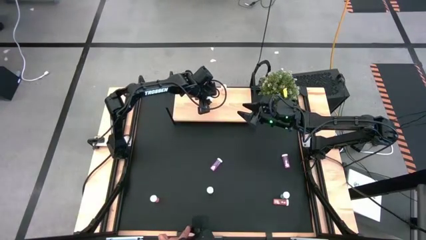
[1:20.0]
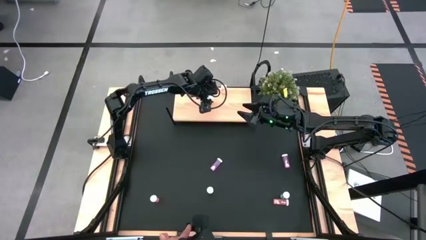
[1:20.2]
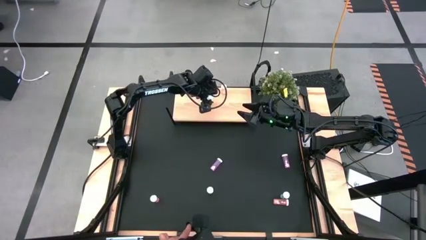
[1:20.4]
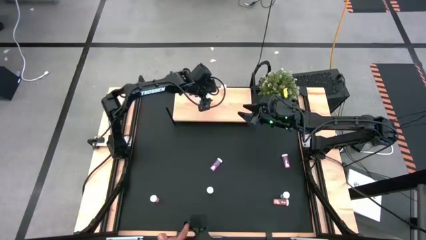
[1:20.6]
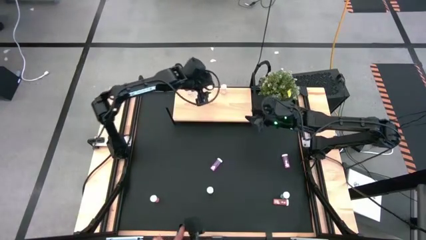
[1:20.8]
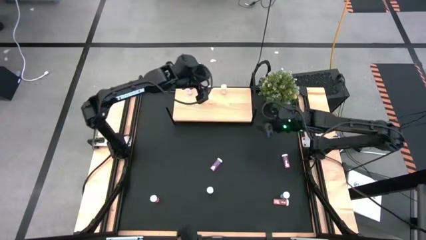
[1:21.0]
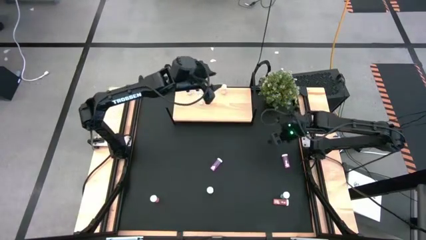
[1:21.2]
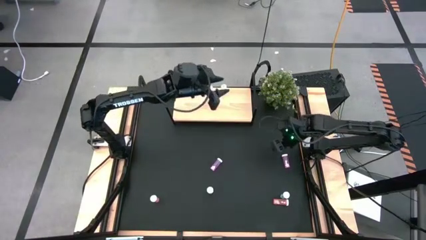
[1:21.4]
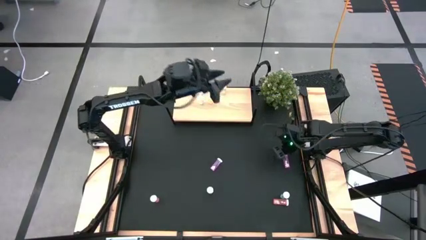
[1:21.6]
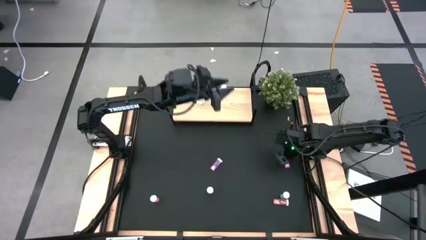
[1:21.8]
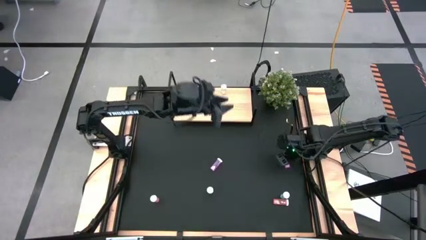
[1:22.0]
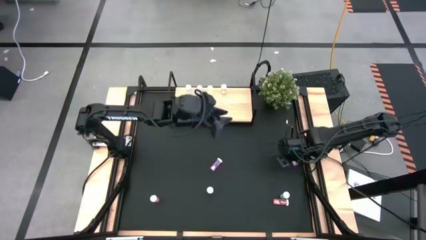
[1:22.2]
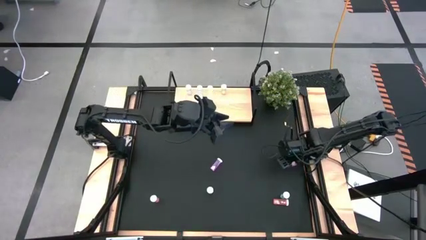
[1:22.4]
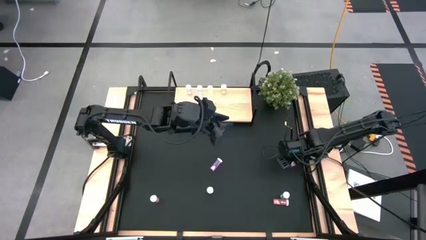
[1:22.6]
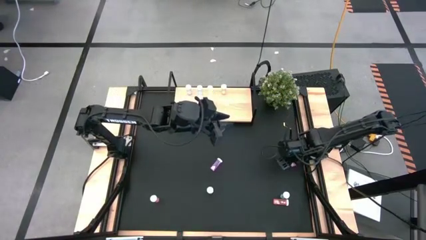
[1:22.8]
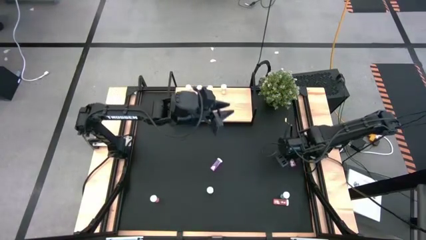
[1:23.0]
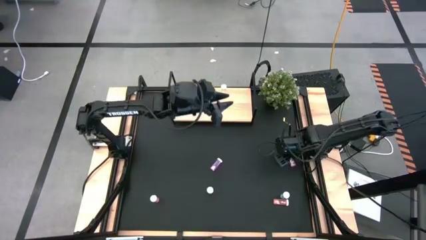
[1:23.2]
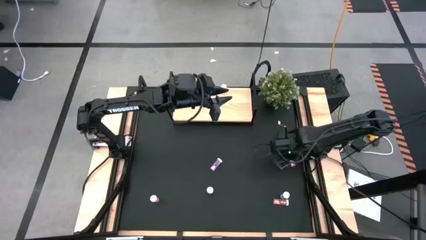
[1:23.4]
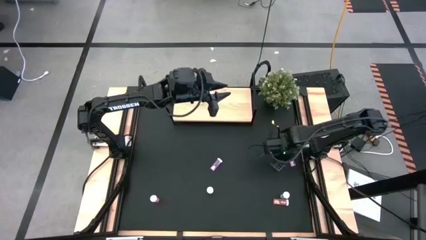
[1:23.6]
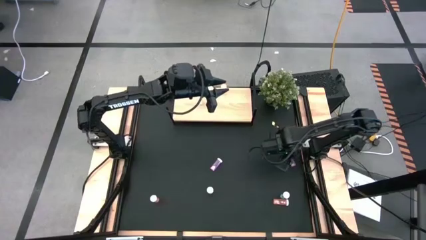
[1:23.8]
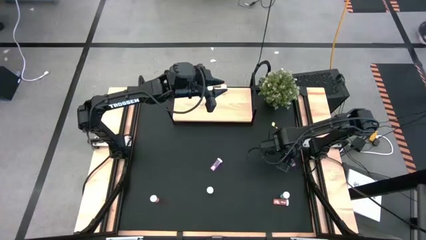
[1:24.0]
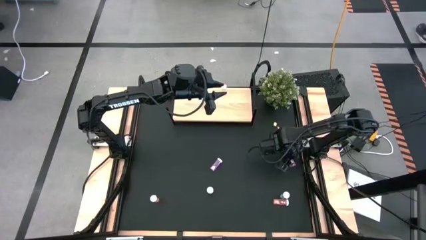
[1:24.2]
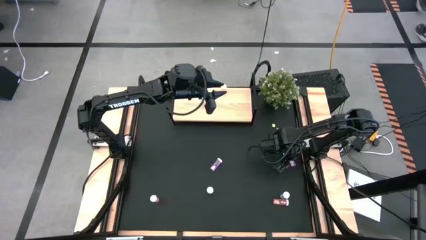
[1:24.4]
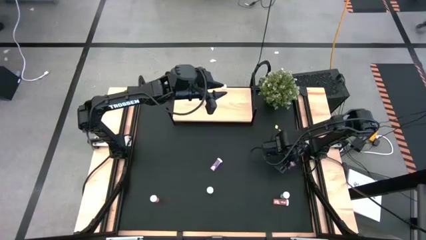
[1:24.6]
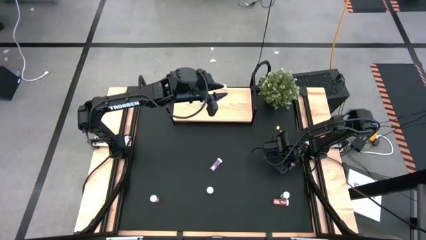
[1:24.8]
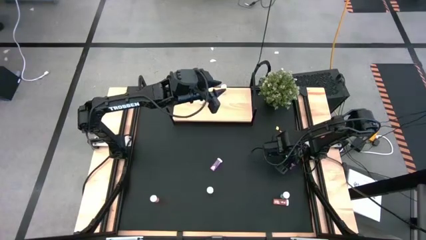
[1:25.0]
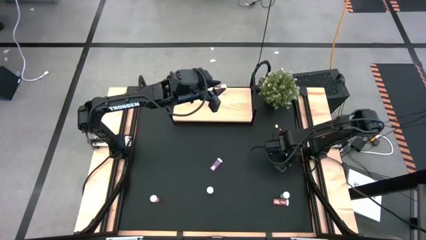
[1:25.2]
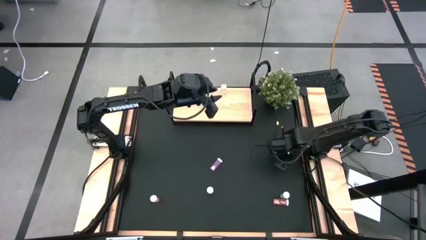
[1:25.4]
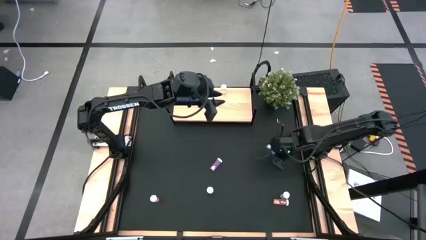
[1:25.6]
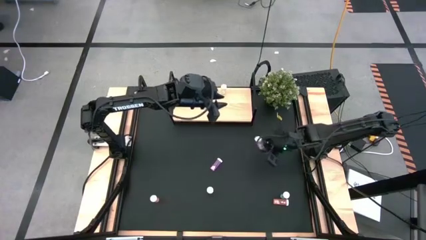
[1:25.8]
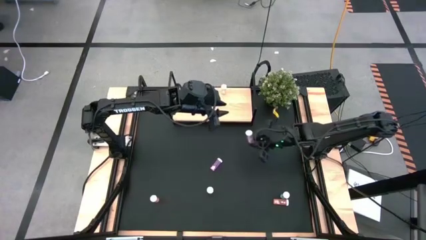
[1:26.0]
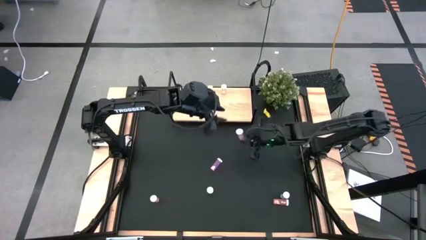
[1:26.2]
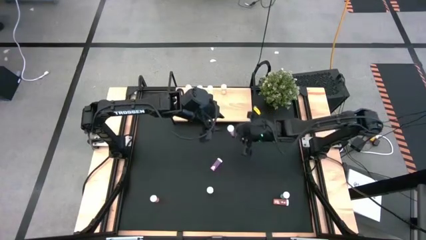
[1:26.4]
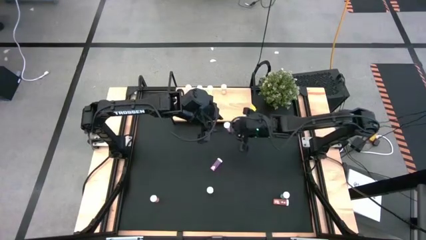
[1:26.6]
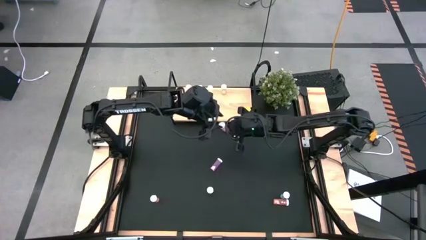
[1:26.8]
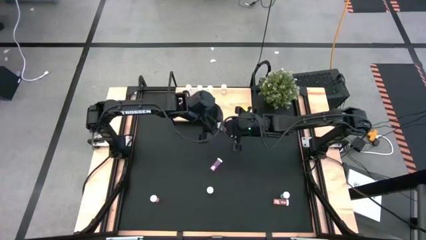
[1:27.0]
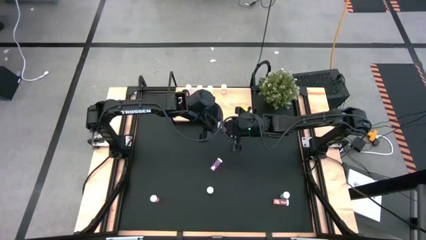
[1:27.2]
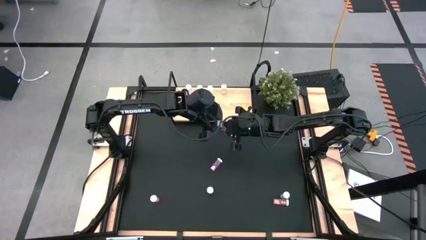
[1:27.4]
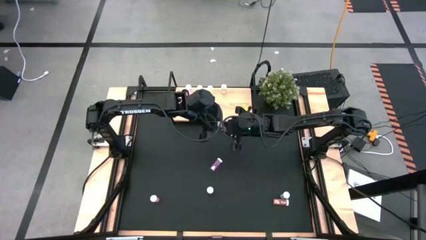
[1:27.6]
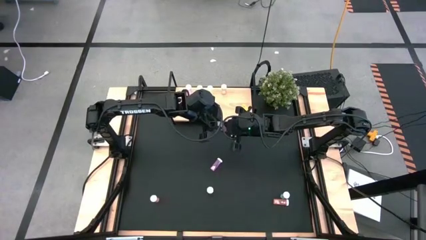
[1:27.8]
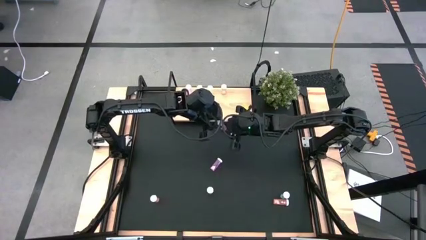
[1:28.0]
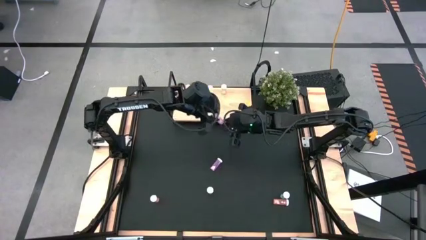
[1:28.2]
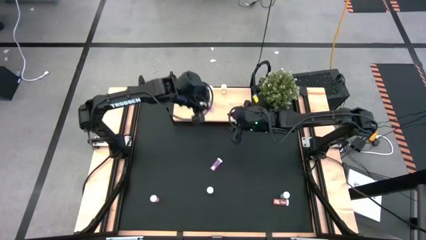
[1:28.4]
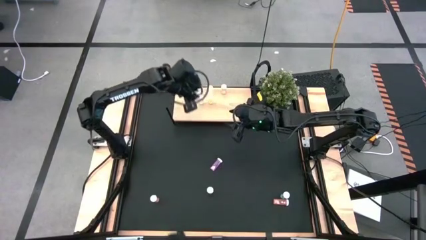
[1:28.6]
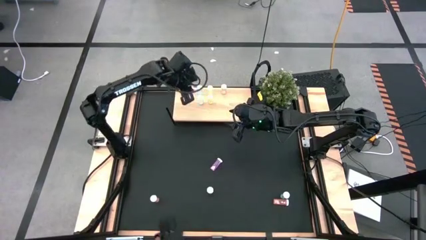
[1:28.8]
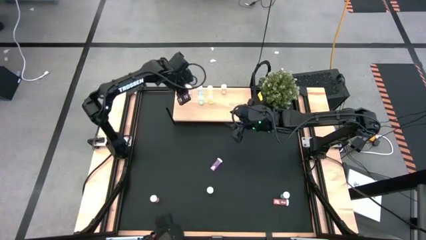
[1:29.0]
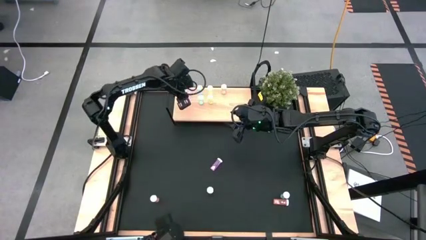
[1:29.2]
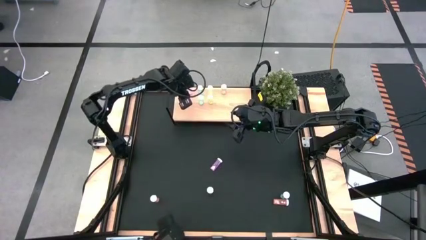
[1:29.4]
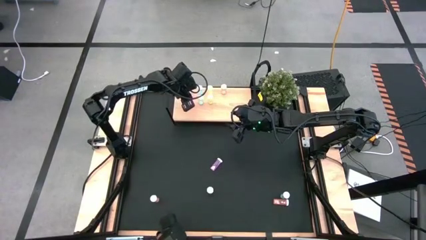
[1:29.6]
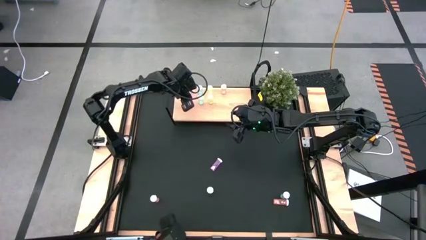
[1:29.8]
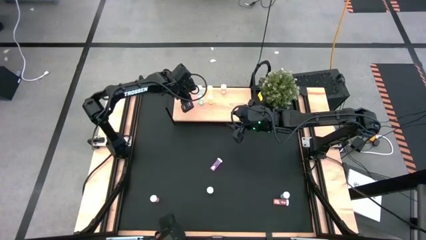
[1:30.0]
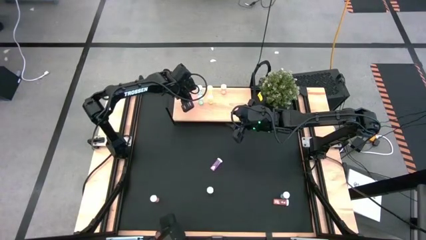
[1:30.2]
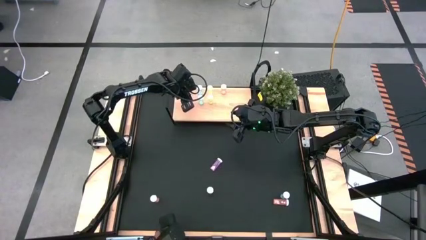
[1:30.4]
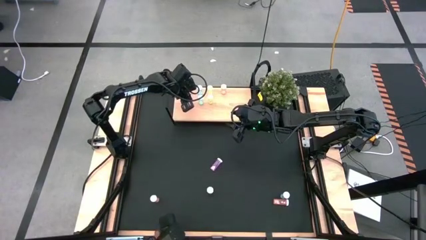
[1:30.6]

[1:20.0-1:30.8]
Task: Pick and place medicine bottles onto shelf by color
Put the right pink medicine bottle on the shelf aligned with the other pink medicine bottle

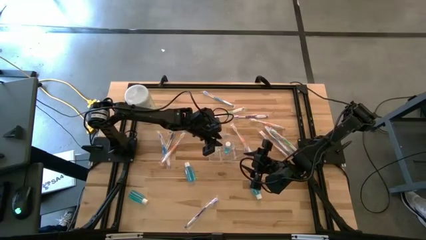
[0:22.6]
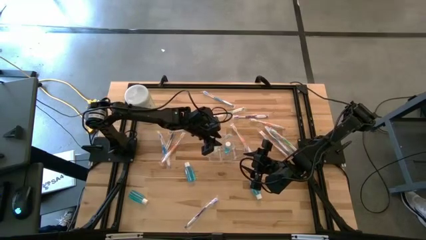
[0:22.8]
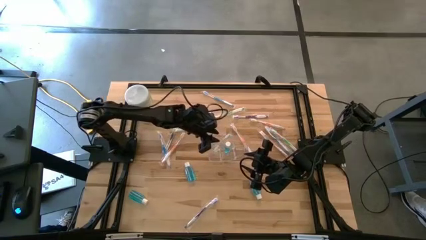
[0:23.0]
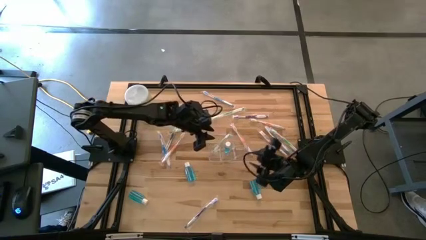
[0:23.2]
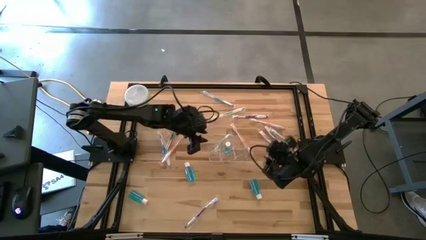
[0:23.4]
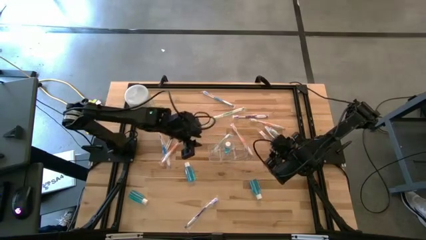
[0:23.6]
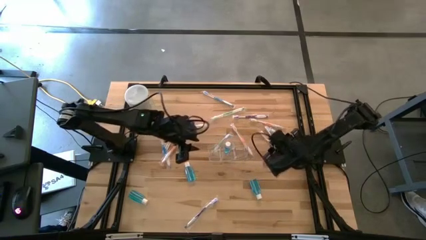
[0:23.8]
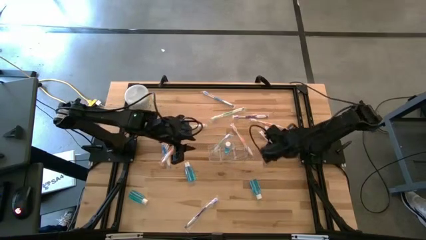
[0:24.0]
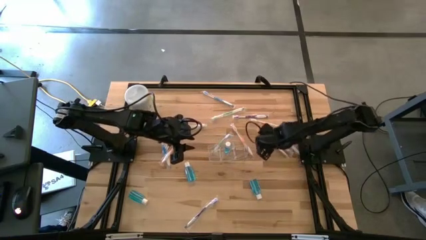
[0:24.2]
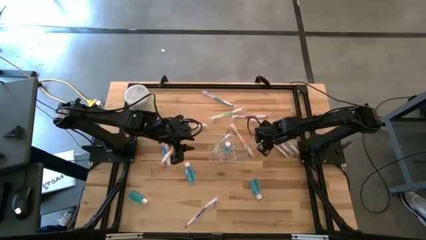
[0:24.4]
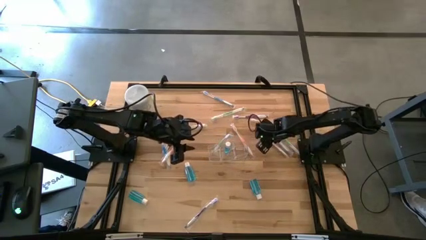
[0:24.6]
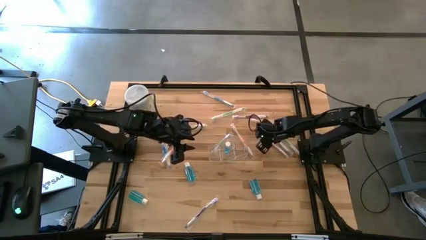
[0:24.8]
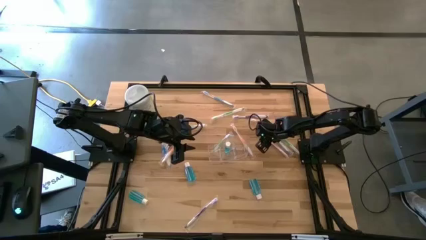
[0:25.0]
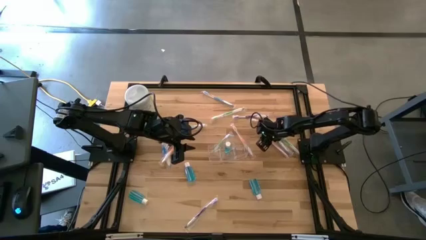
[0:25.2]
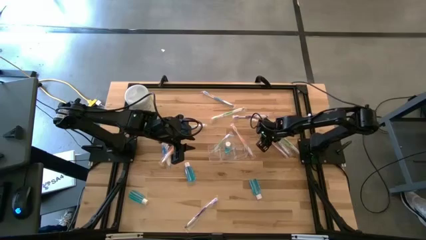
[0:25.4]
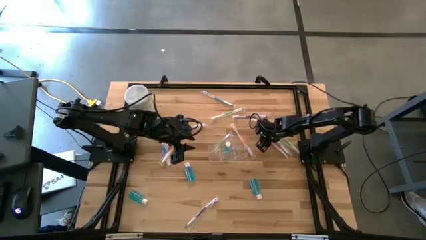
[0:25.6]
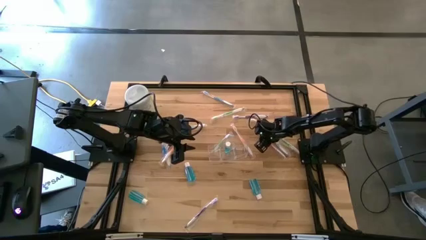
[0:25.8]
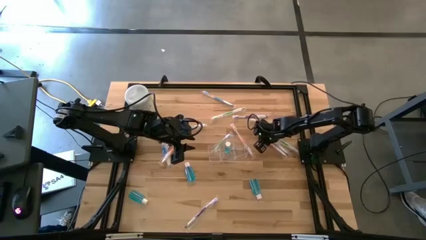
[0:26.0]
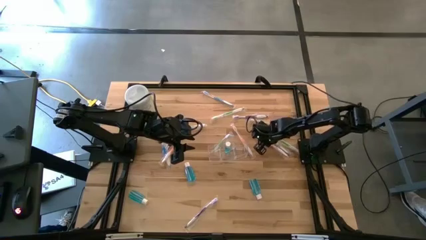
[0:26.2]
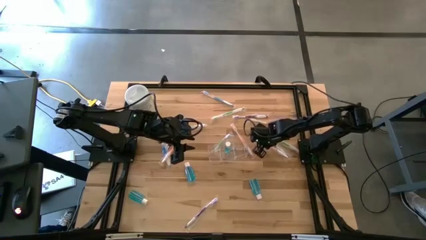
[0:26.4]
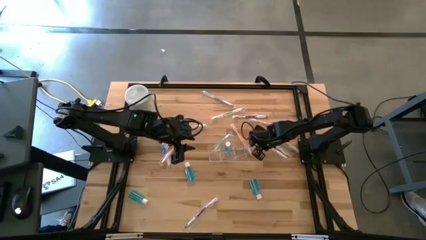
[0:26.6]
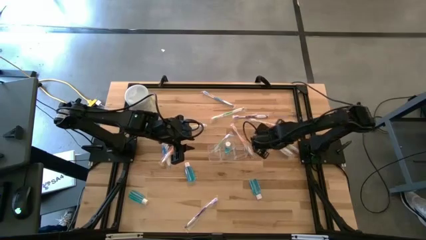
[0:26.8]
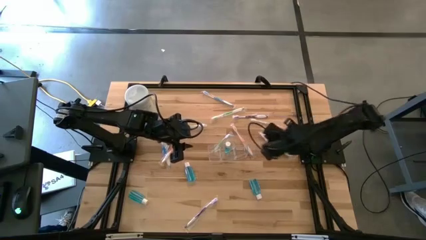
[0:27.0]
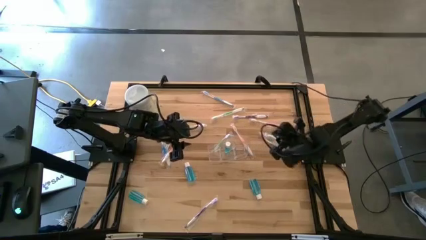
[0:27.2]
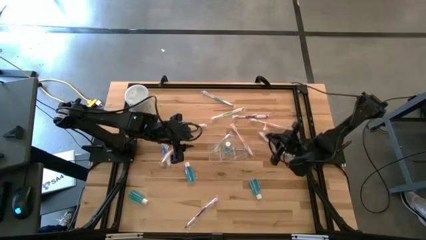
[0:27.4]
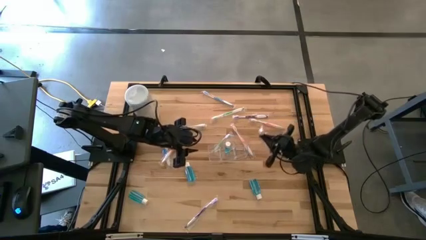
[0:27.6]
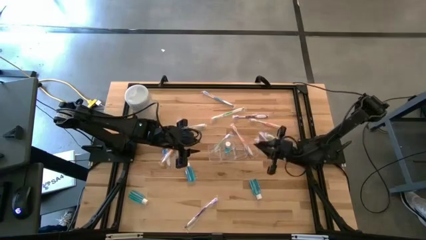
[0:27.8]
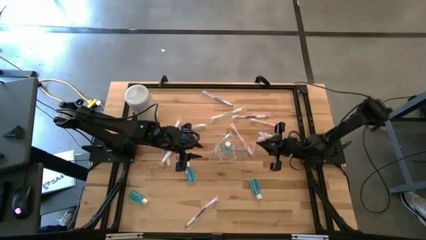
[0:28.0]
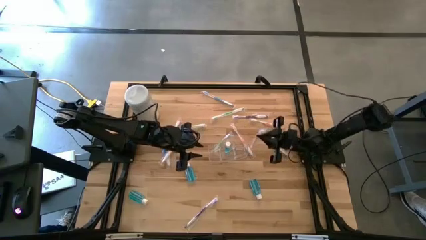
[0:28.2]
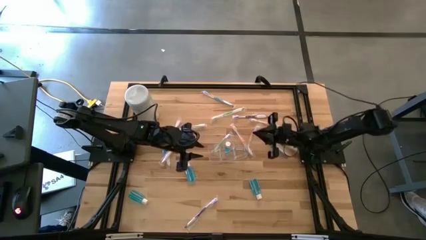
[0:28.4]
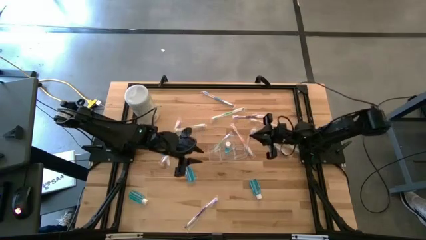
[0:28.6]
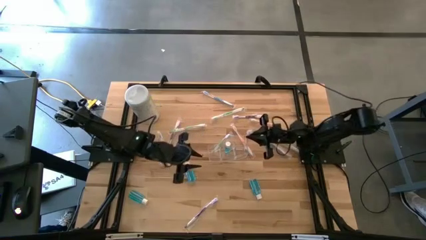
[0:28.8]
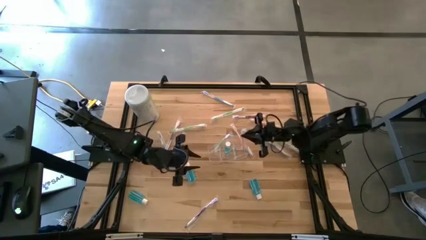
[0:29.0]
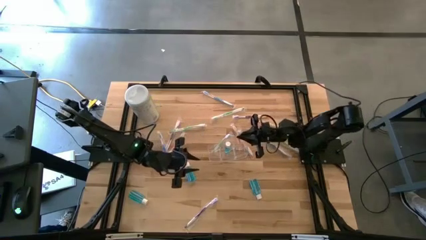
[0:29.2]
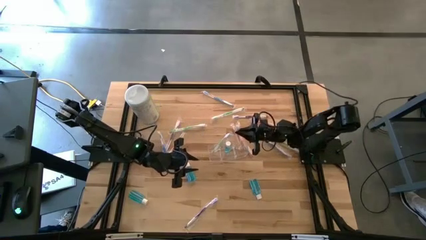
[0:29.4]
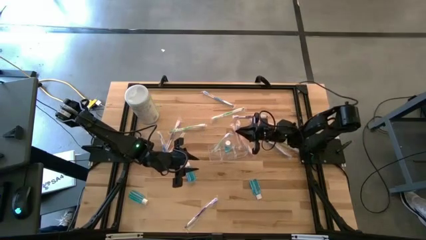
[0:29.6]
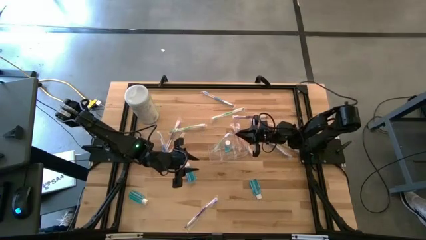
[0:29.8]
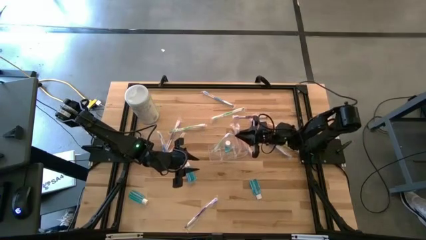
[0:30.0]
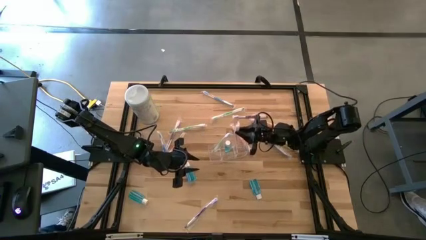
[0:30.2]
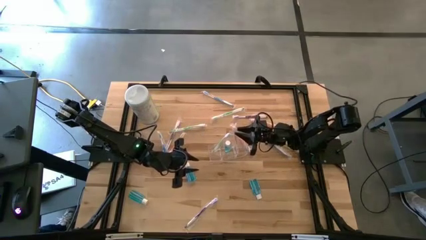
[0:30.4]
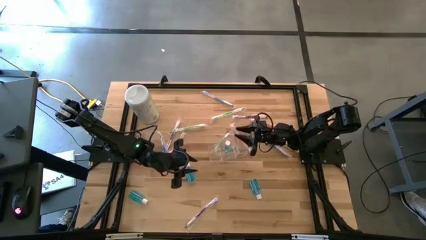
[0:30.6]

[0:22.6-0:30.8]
Task: Pick & Place toothbrushing station
Put the orange toothbrush into the transparent organizer
